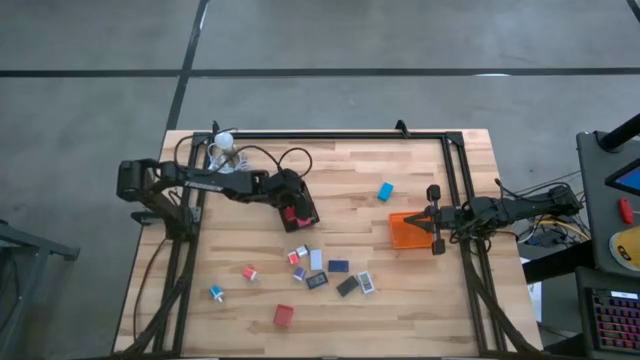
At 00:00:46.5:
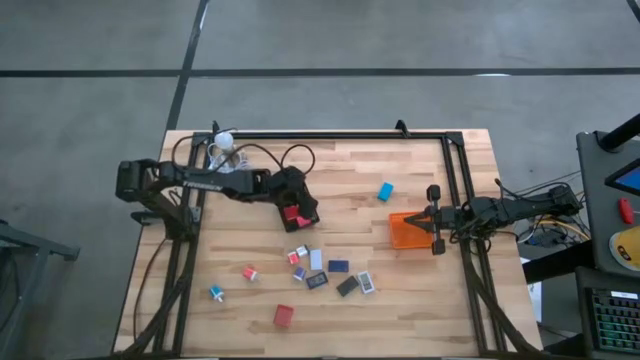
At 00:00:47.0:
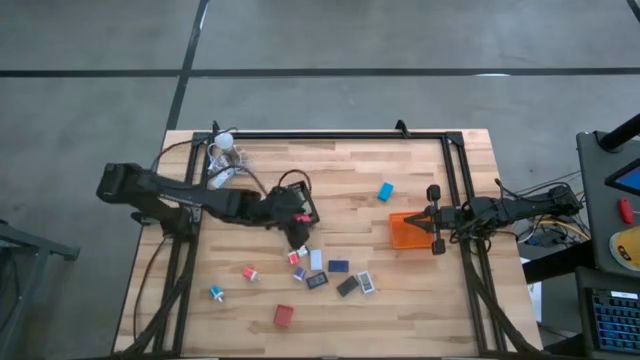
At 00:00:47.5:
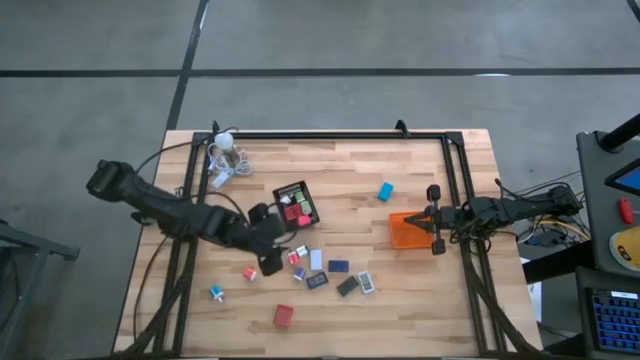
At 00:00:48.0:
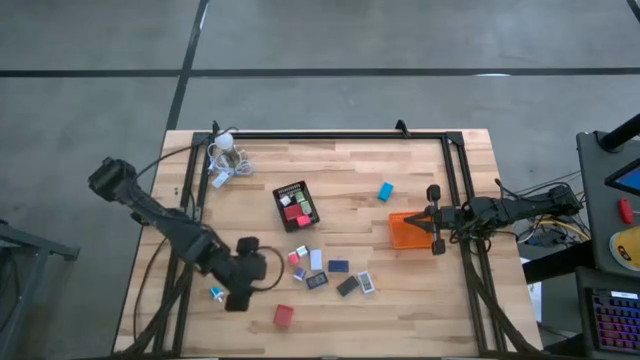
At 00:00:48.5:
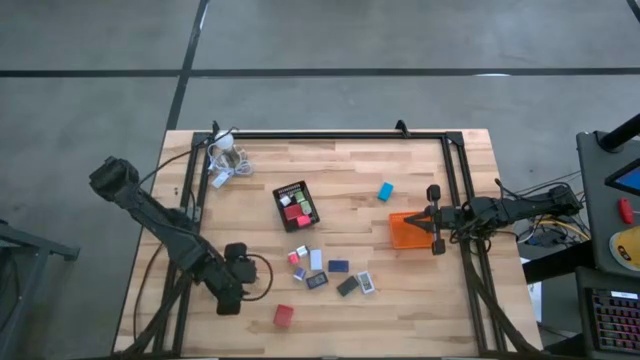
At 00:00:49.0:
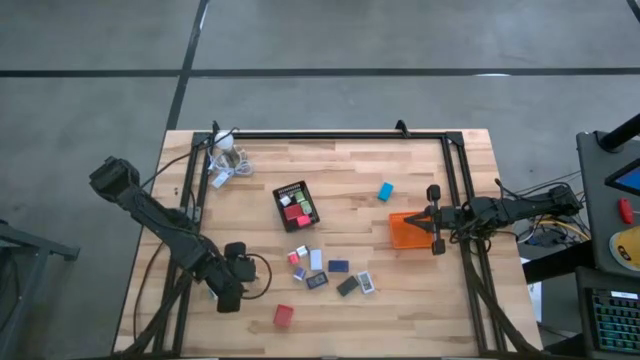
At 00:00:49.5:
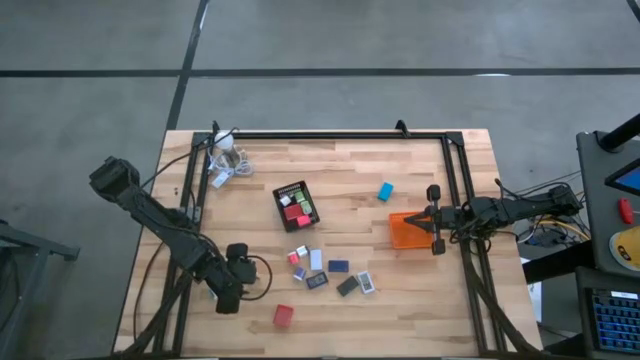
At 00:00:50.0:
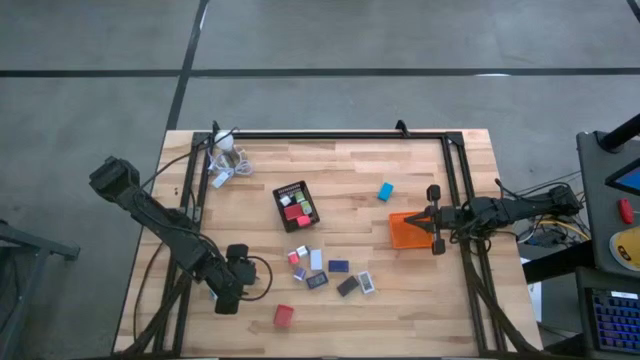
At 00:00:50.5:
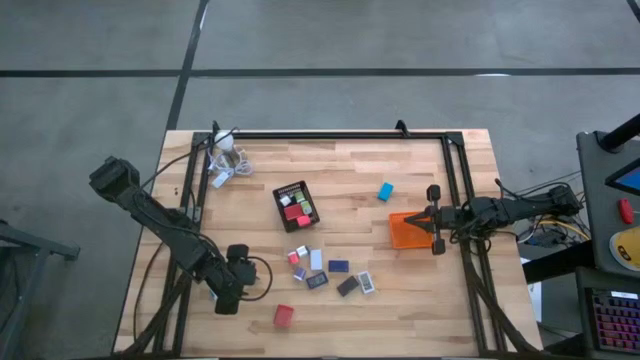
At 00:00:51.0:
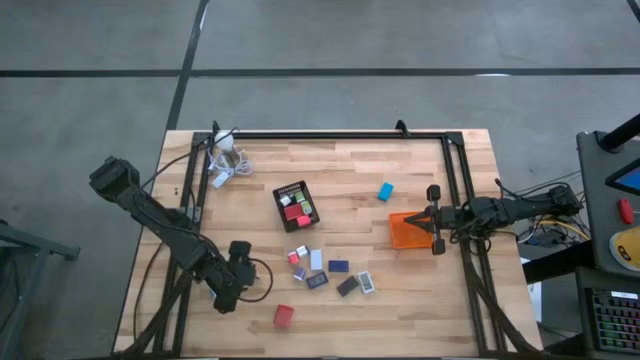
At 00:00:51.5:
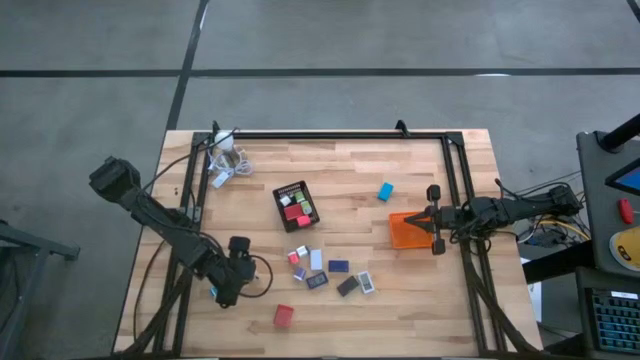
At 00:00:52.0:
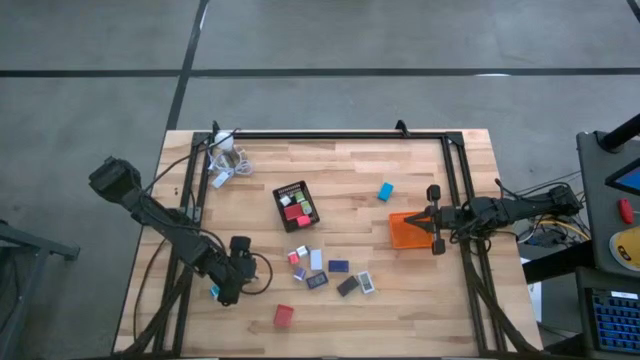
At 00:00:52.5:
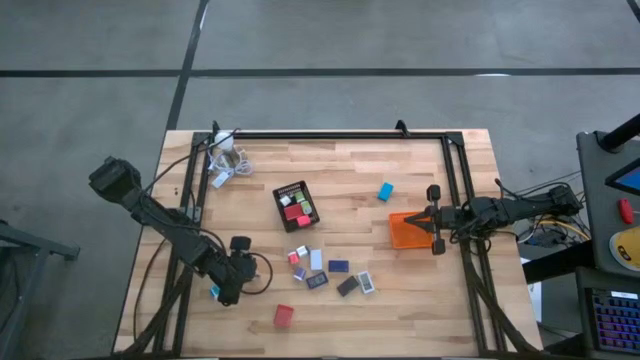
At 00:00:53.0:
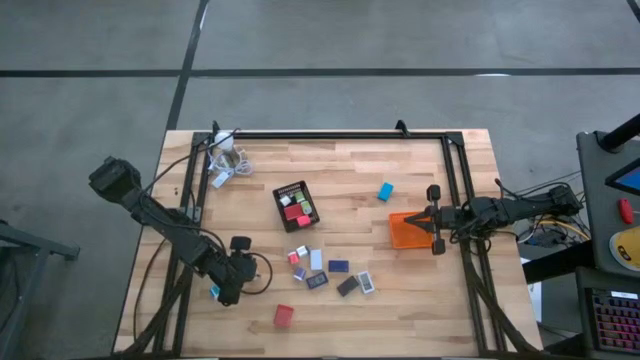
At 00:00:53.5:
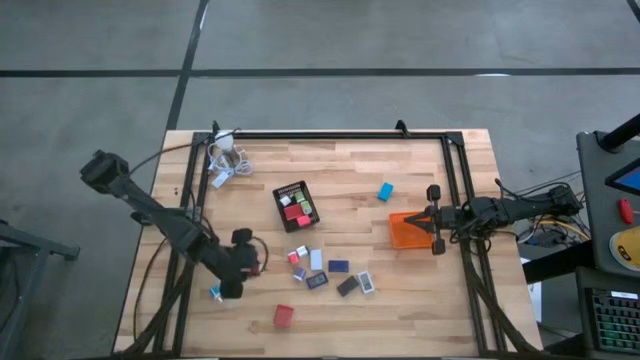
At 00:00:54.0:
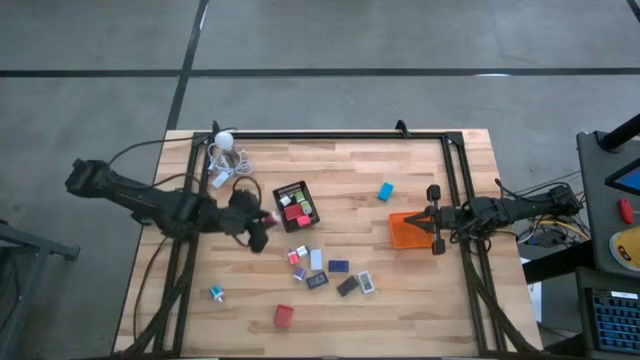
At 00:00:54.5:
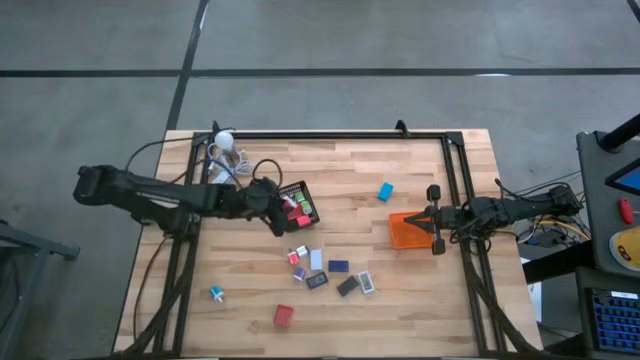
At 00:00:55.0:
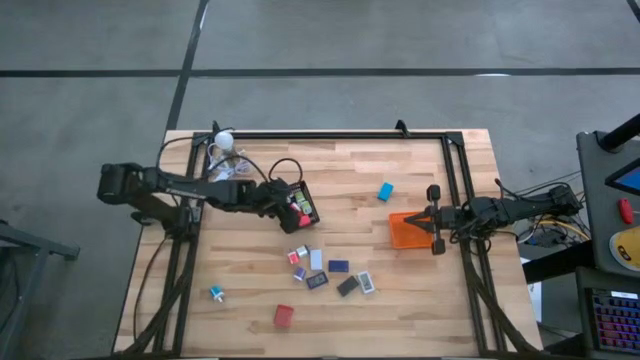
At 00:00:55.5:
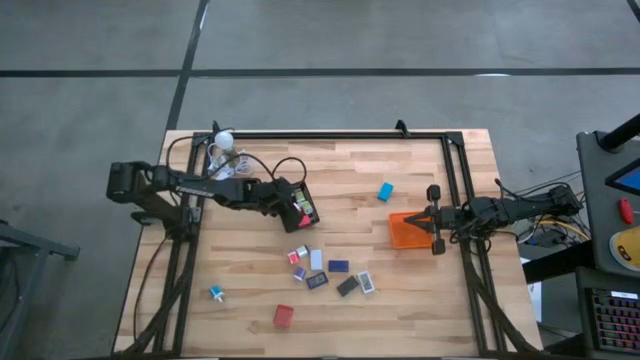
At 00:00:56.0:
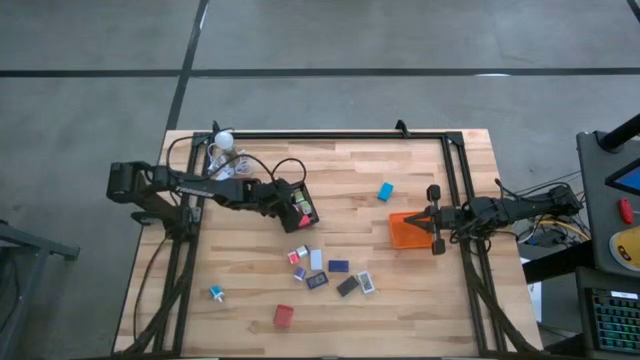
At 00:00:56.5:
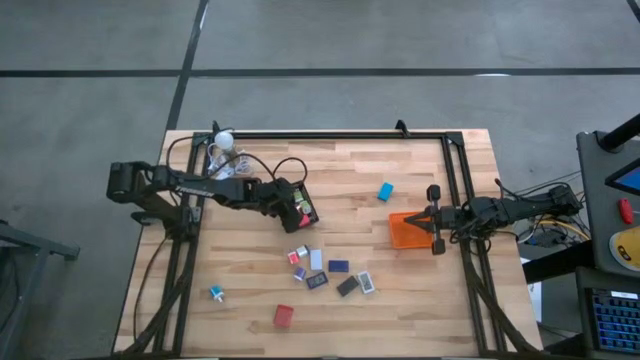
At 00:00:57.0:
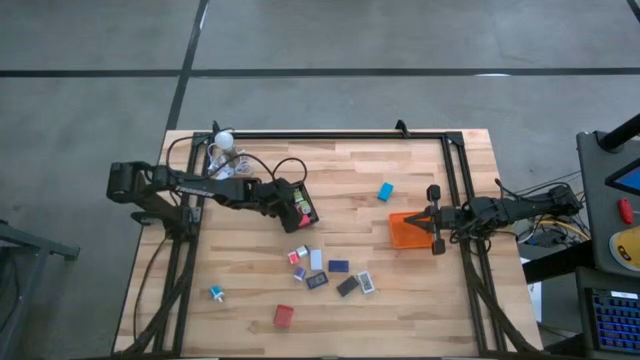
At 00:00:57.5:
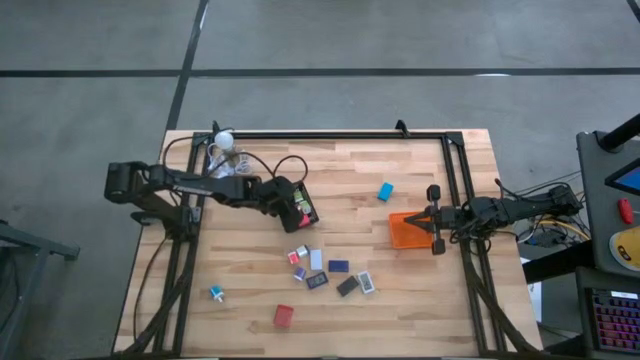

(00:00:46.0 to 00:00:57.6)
Task: Pick & Place Office items
Put the left pink charger adapter in the black bin

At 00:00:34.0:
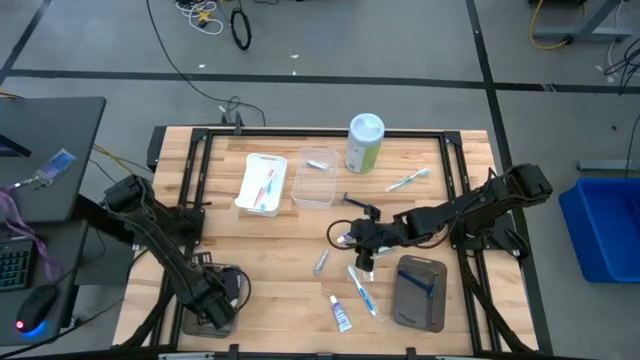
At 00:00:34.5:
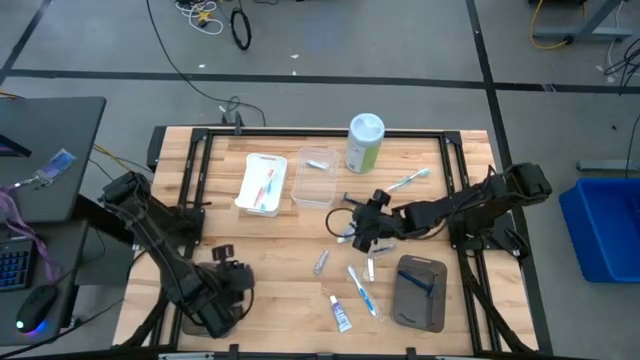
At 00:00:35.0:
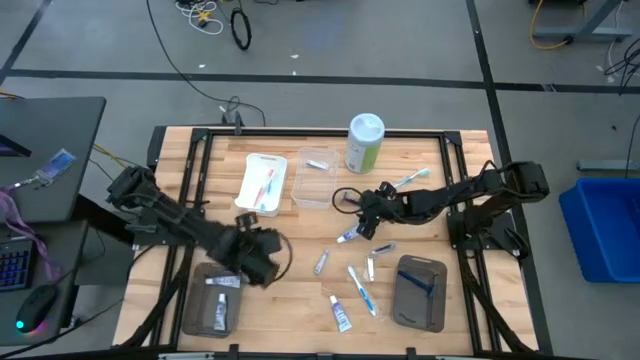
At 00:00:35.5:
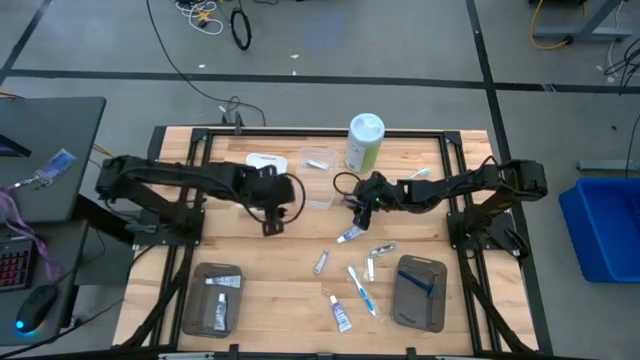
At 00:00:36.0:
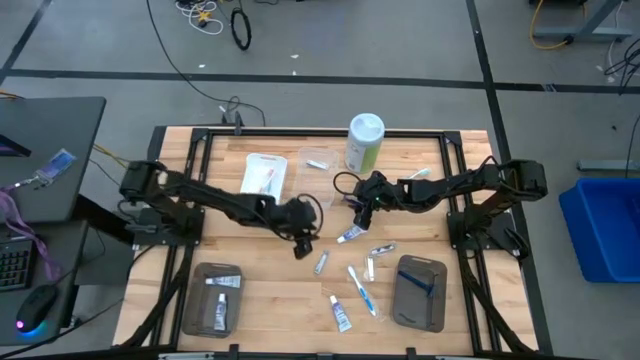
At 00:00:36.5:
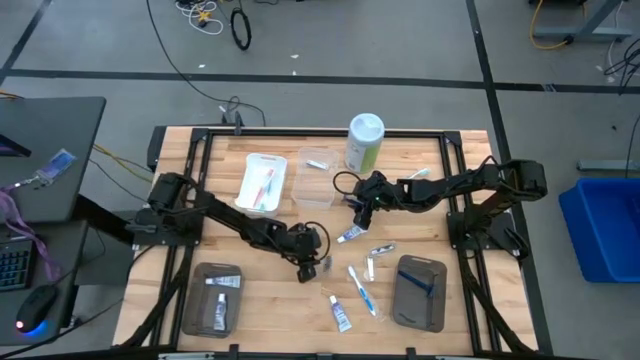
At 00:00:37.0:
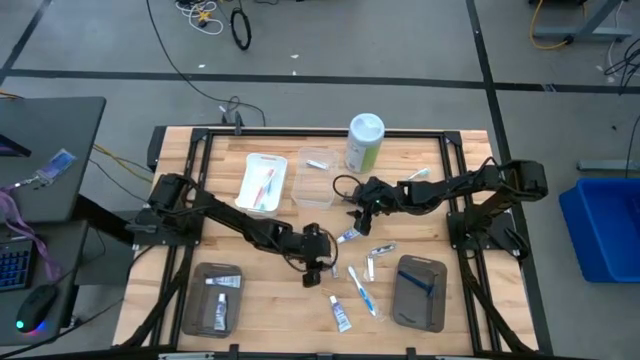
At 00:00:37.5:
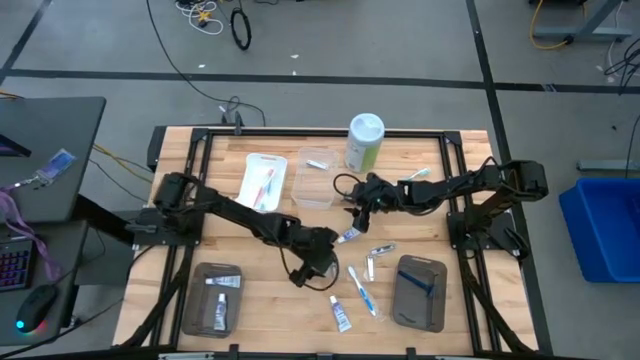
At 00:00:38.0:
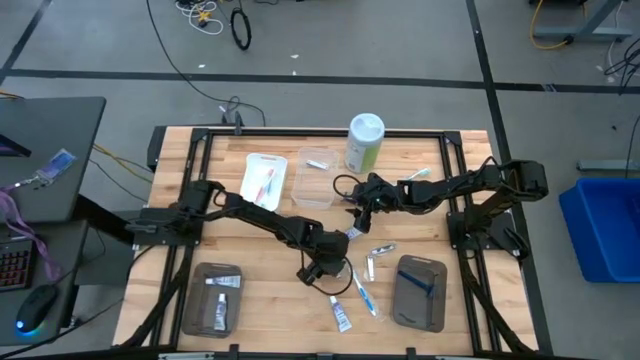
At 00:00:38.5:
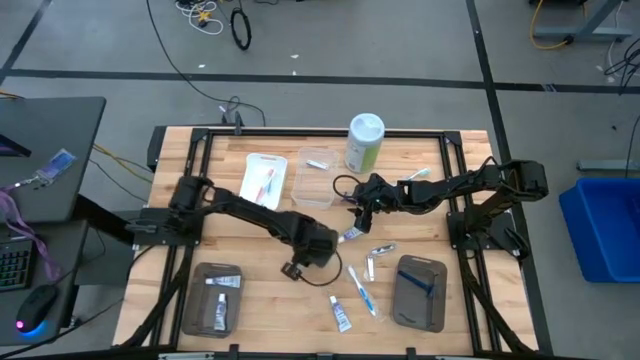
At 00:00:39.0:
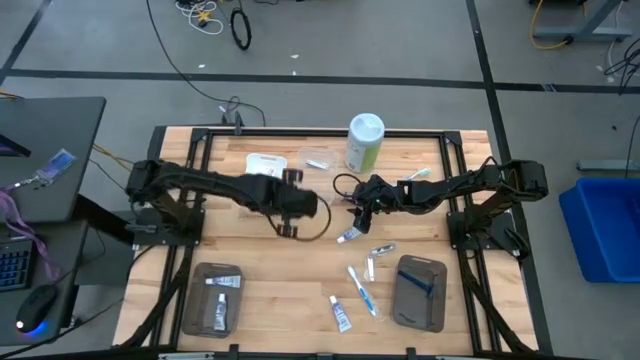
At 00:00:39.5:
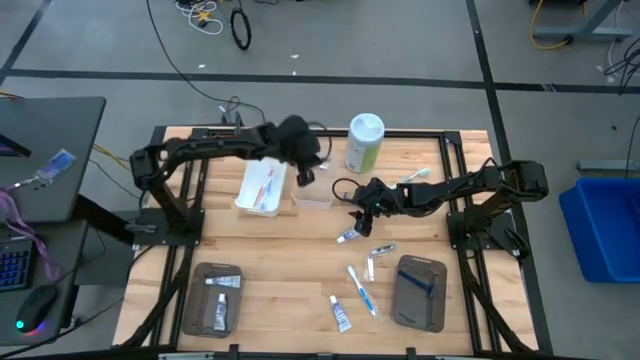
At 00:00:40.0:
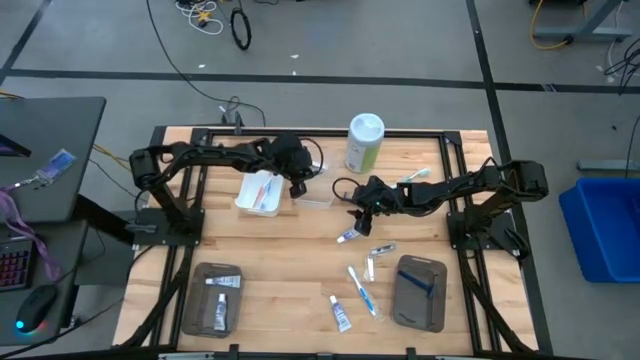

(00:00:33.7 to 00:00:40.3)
Task: Pick & Place Travel size toiletries
Put the nail cutter into the transparent bin

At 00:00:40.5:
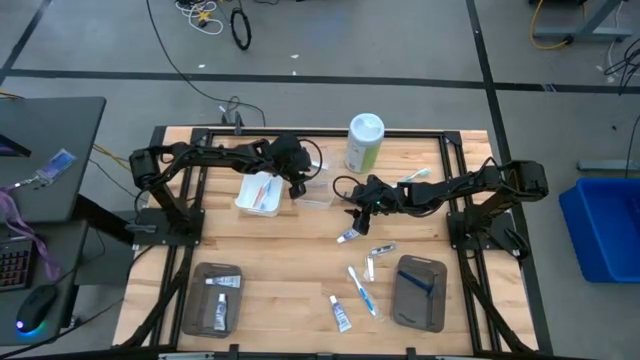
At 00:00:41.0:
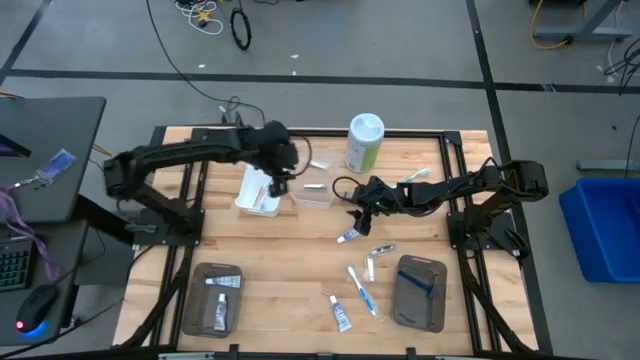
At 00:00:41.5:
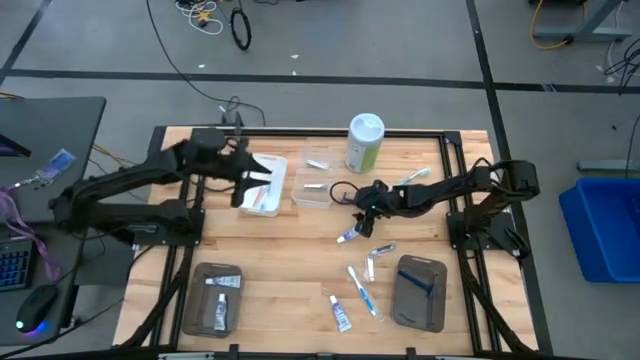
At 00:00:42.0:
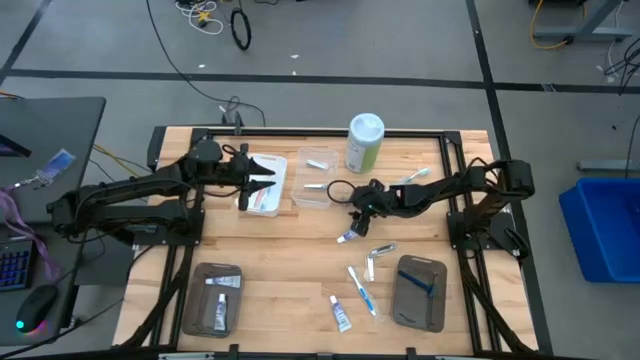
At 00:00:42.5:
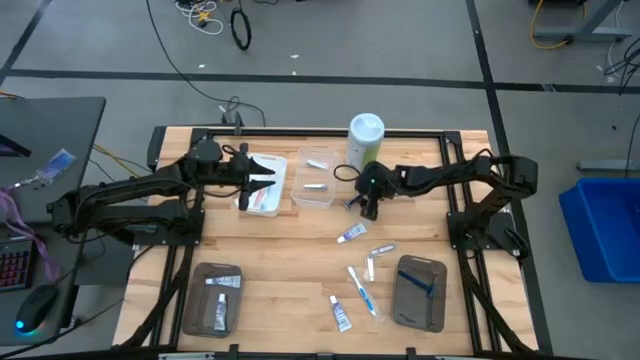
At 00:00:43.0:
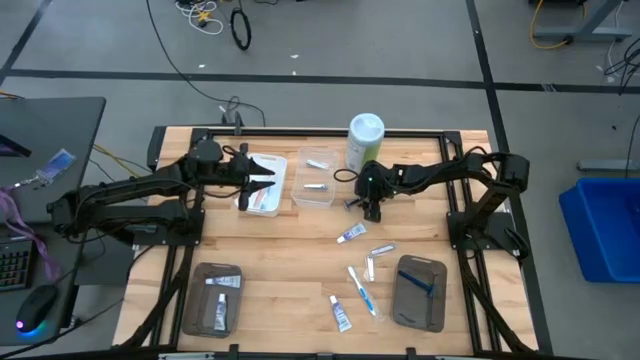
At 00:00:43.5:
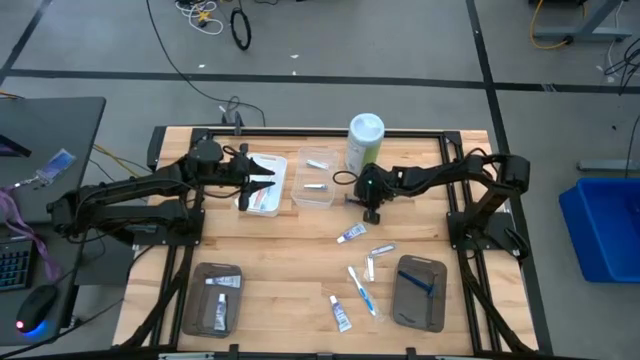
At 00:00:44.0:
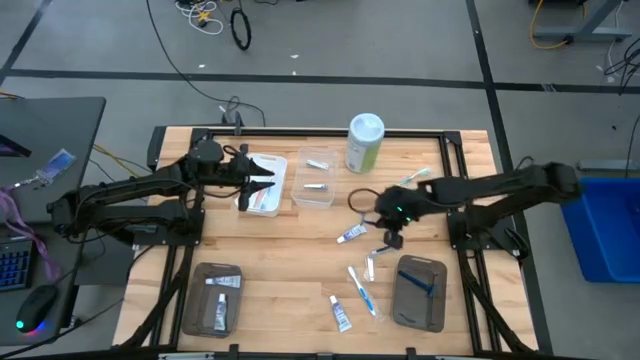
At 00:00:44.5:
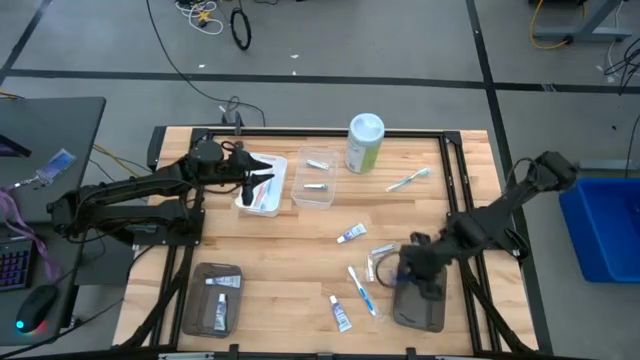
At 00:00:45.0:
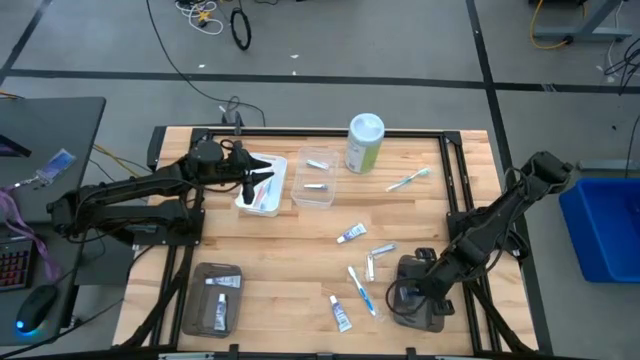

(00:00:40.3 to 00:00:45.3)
Put the blue razor into the right black bin
